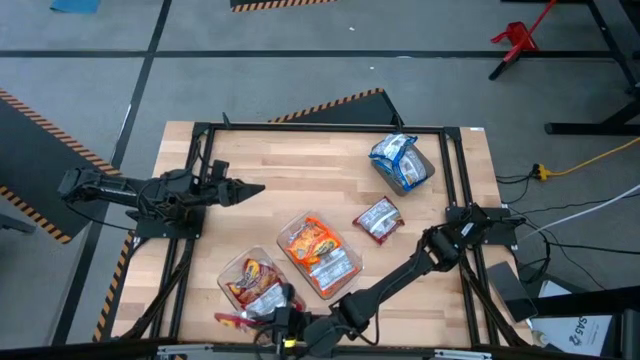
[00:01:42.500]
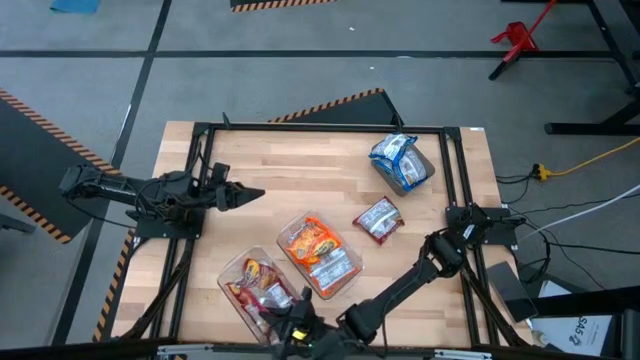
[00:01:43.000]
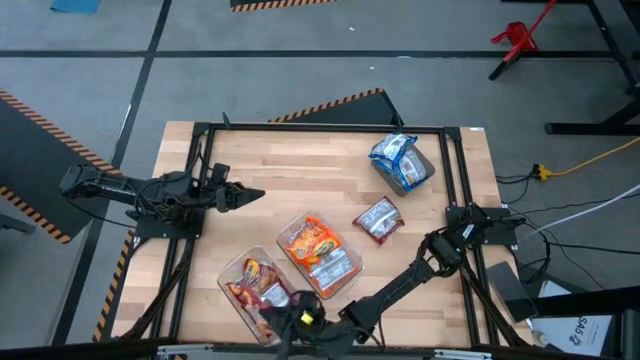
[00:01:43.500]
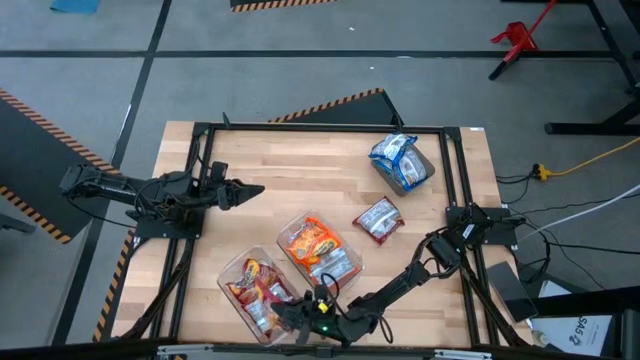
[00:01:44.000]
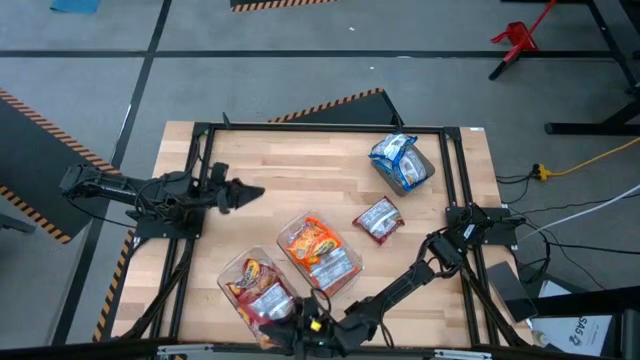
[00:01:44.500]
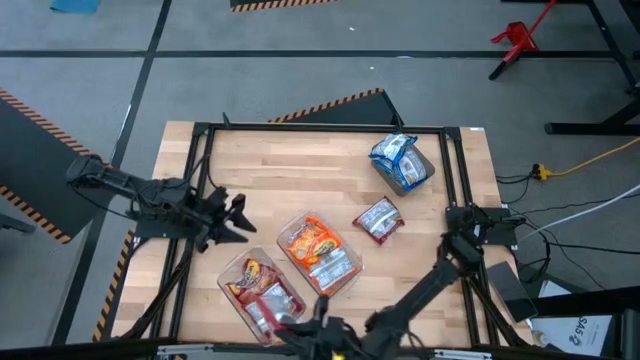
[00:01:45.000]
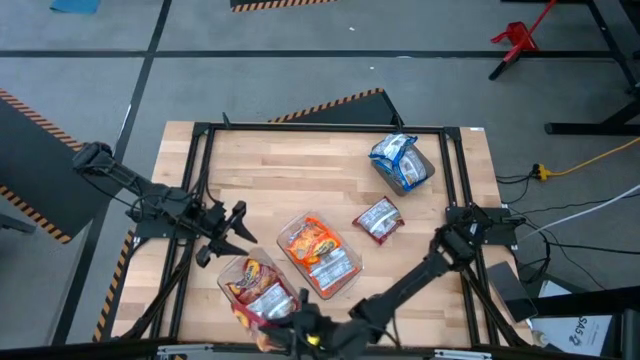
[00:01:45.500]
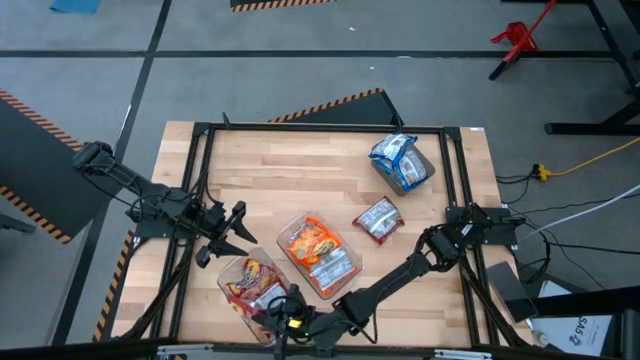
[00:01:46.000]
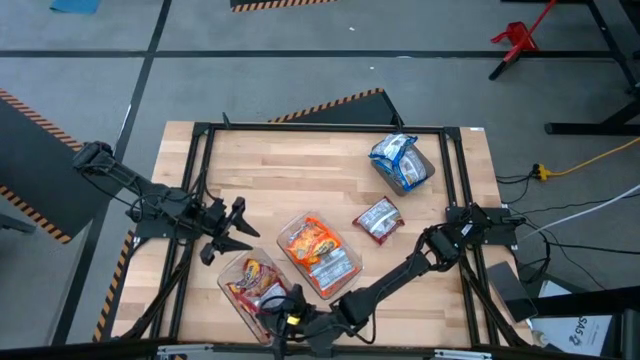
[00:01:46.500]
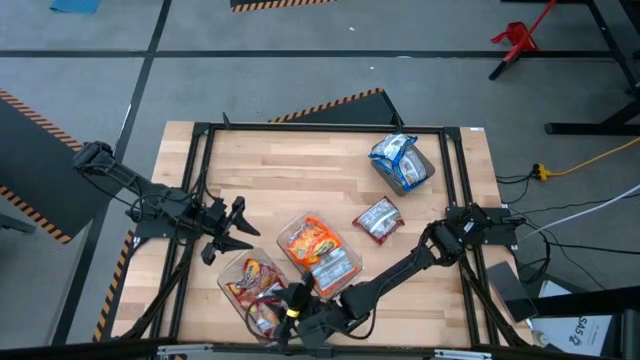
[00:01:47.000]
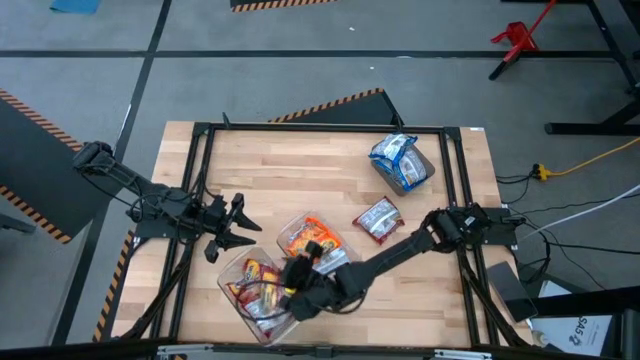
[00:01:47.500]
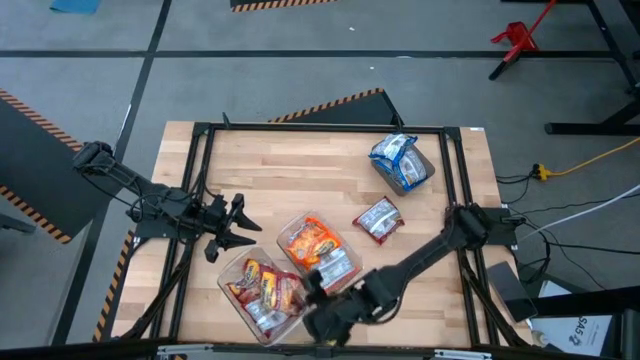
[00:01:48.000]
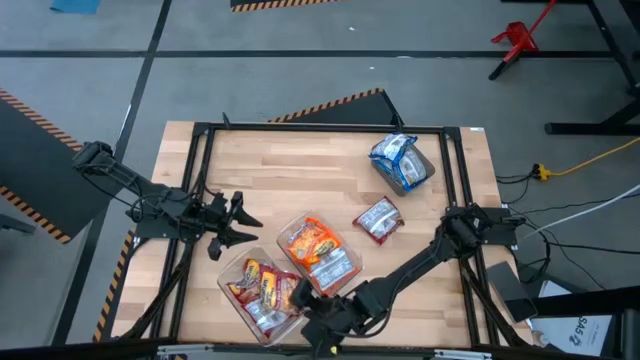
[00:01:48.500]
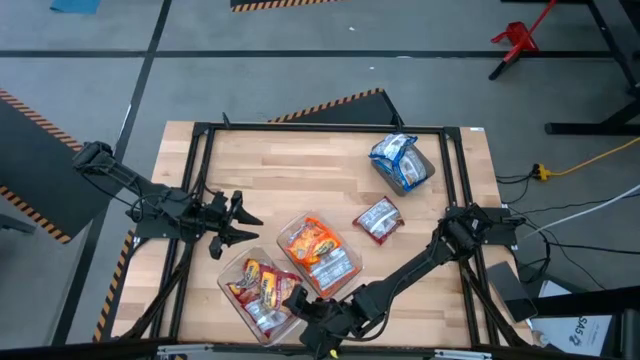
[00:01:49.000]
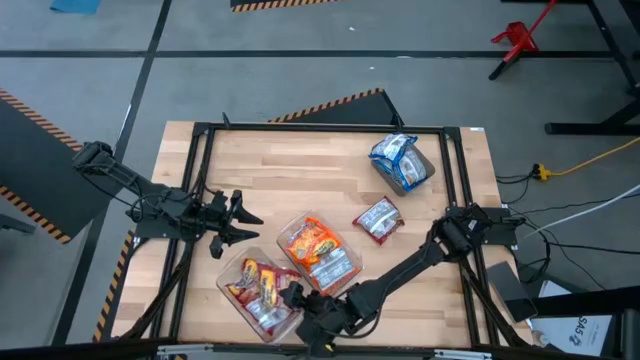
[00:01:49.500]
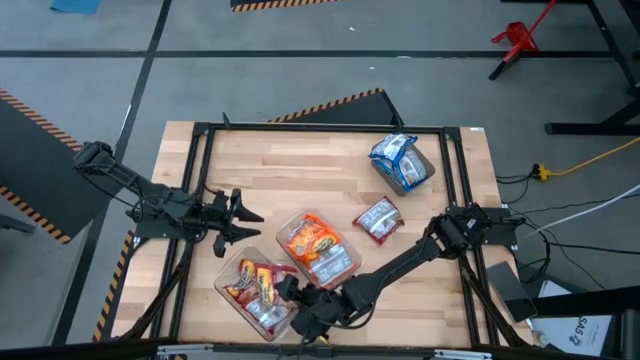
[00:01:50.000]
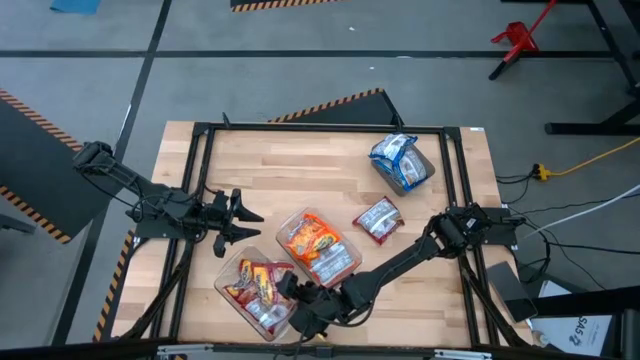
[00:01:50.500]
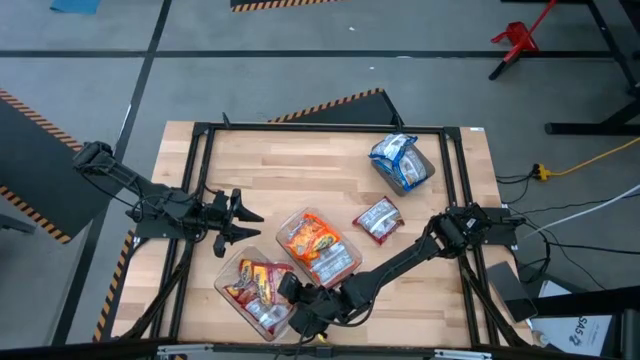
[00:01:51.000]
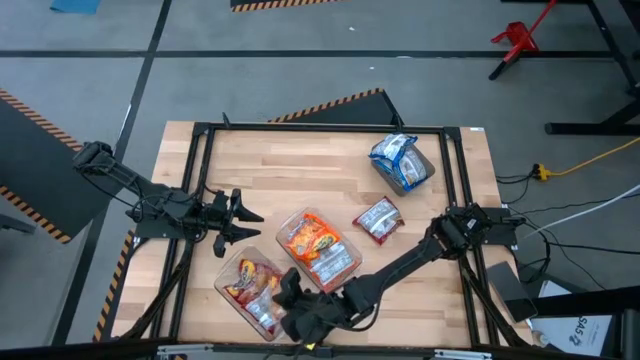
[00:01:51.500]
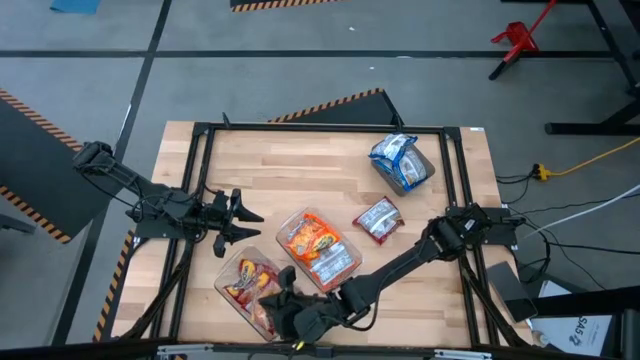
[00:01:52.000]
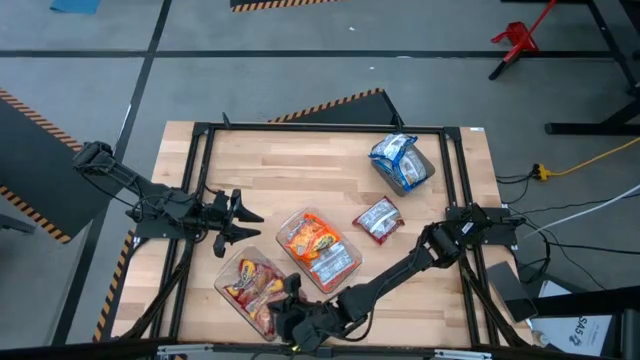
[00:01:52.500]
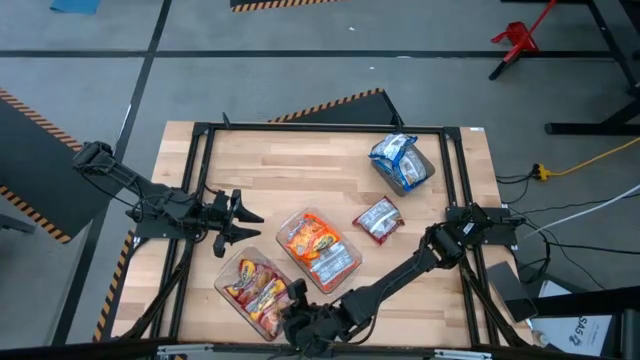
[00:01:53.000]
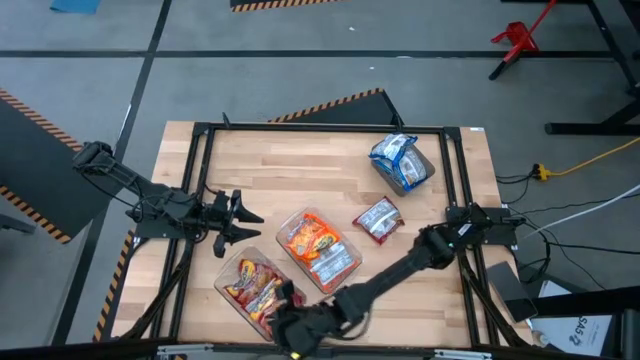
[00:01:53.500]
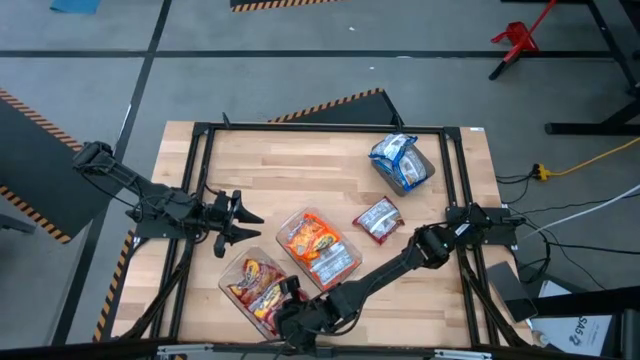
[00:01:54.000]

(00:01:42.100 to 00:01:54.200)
Task: Sort Maruchan noodles
Put the red noodle pack into the bottom transparent bin

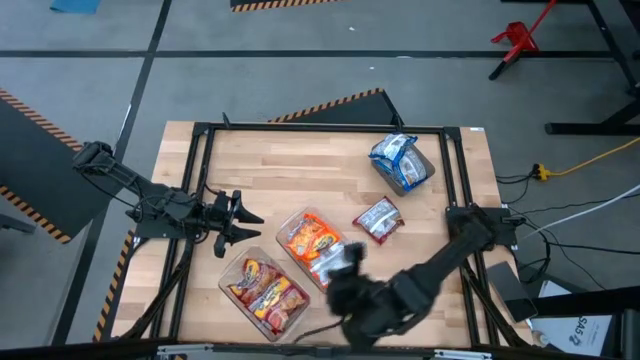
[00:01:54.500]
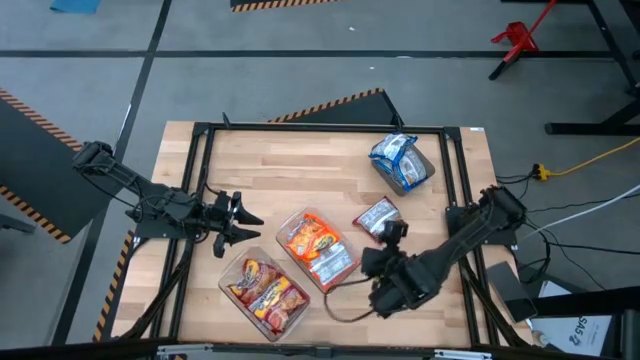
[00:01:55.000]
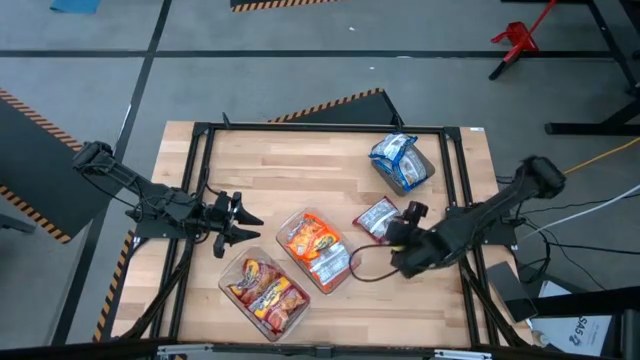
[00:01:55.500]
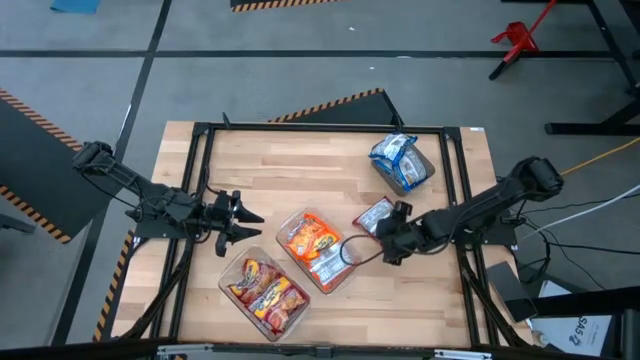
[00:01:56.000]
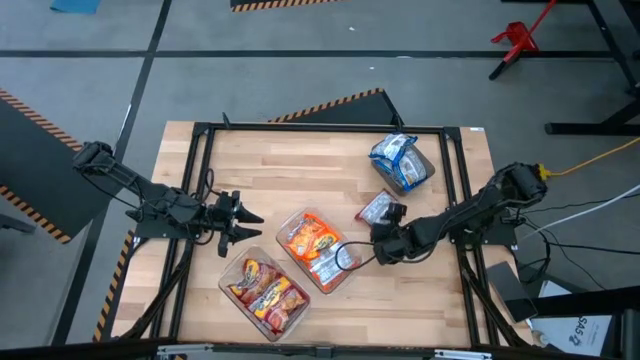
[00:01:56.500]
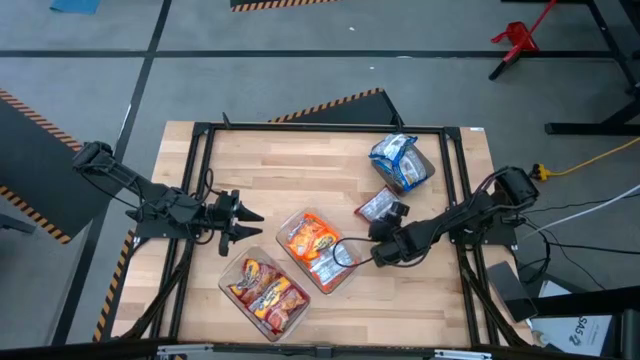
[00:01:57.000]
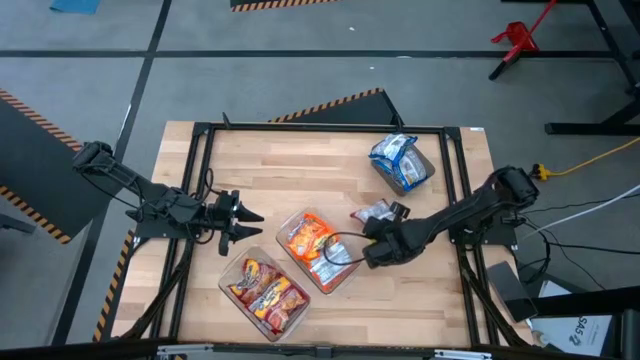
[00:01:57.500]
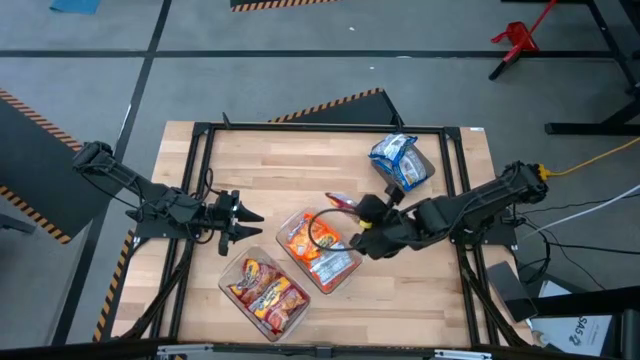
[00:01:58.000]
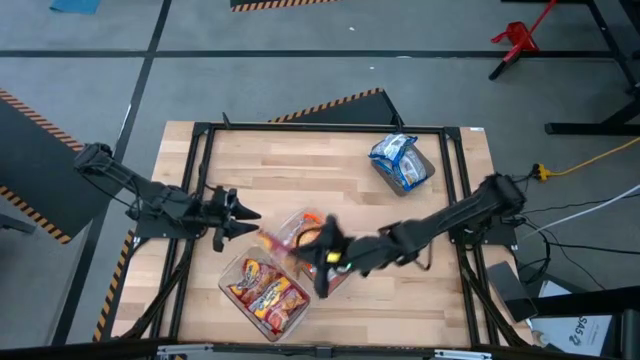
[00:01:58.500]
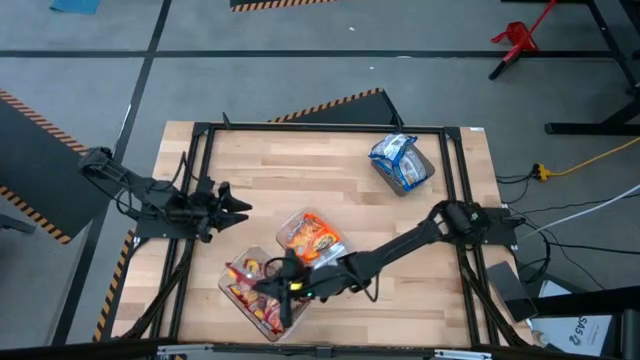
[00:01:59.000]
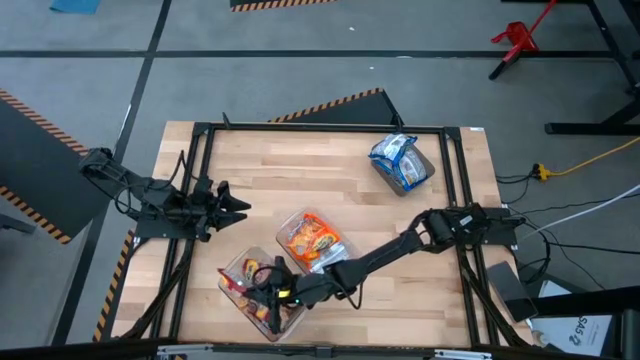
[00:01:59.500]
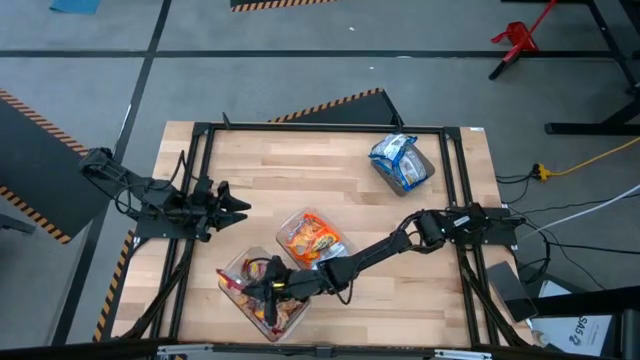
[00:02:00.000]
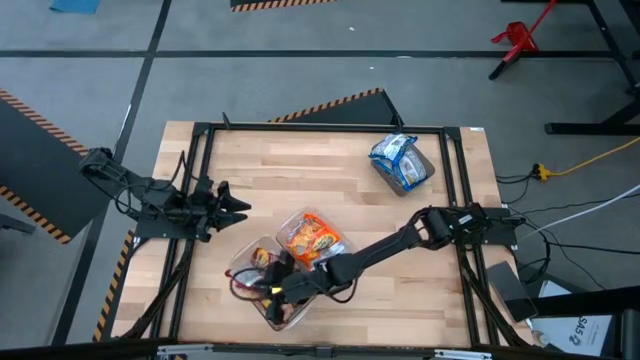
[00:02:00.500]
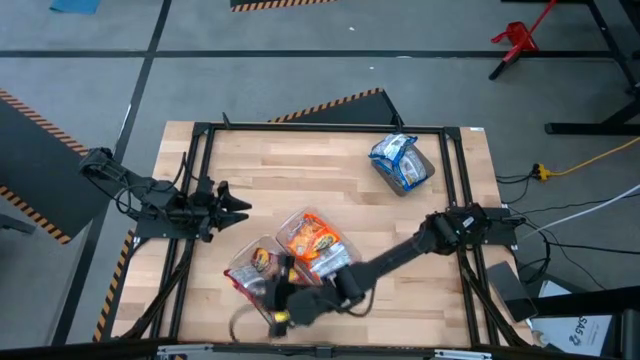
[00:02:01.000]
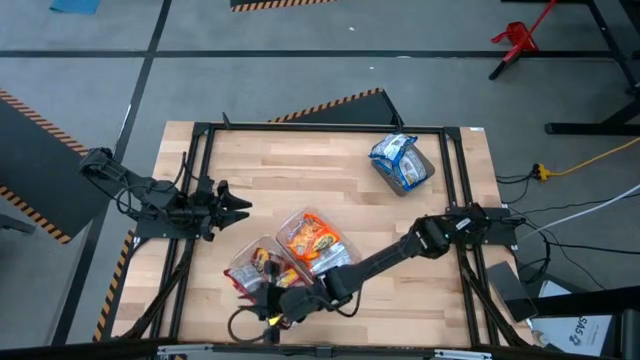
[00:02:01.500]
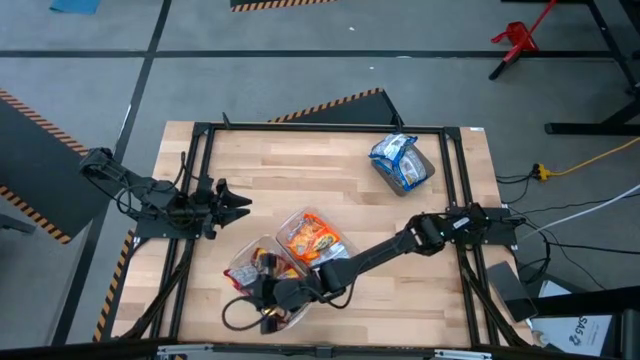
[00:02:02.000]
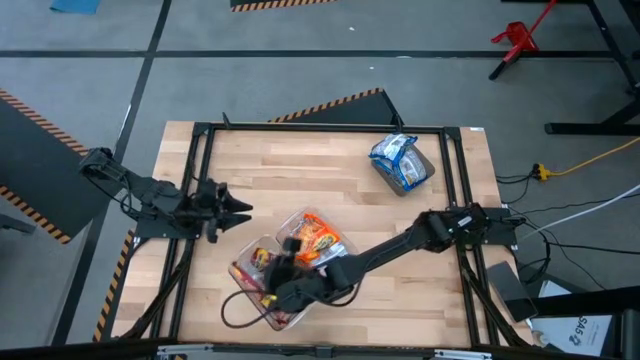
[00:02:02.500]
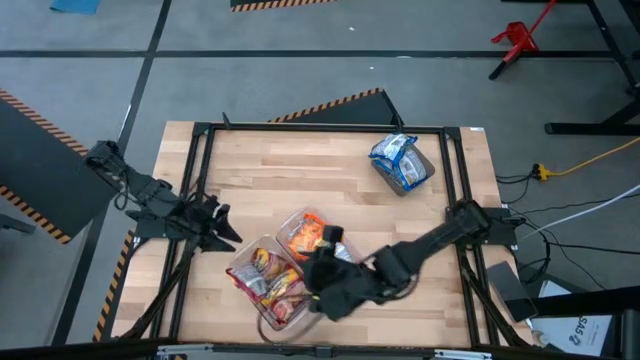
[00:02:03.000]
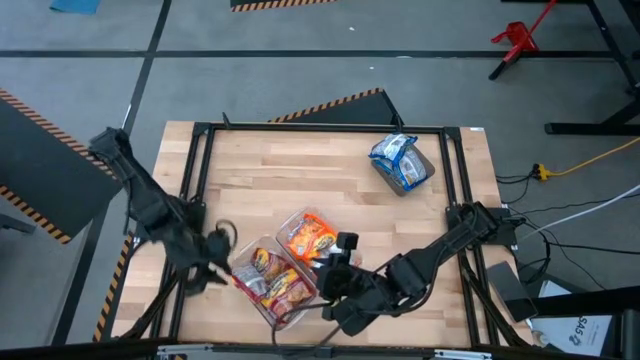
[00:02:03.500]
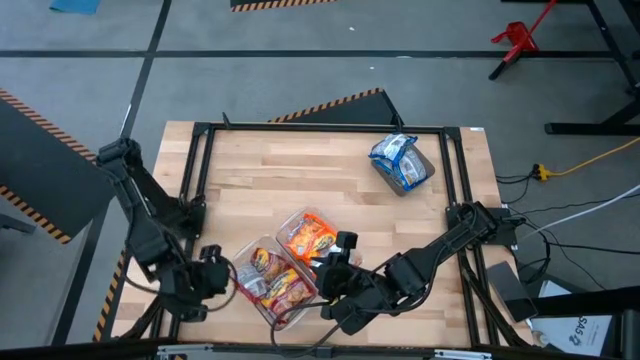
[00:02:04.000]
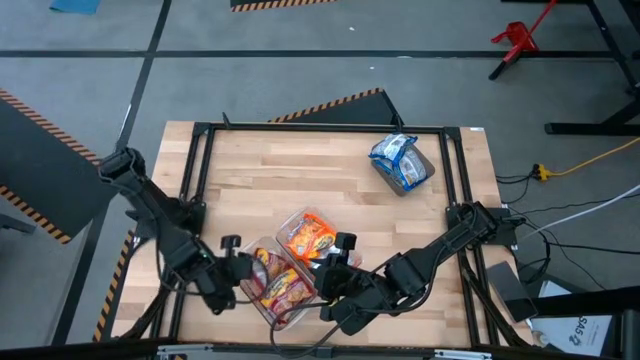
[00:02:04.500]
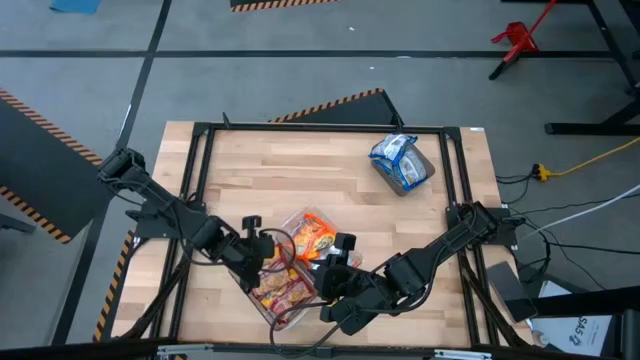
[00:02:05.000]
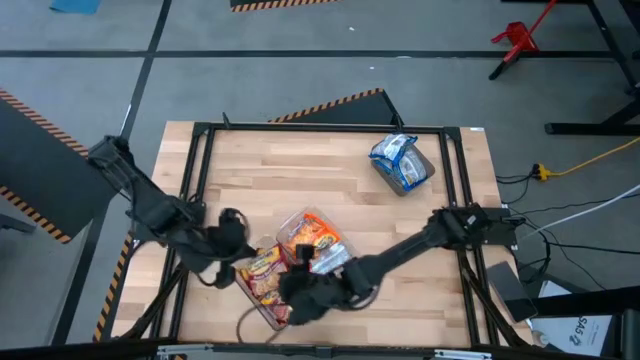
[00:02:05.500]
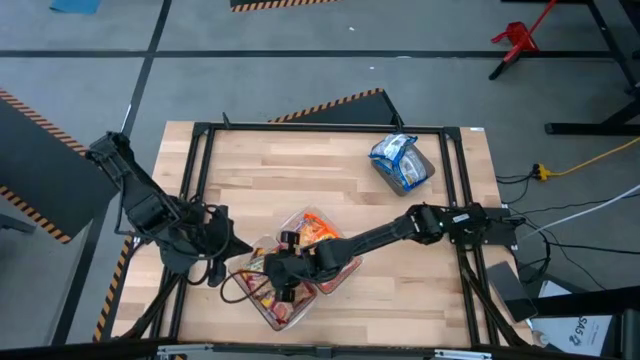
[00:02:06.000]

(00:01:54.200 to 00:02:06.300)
Put the red noodle pack into the bottom transparent bin
